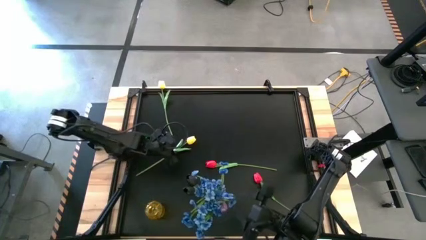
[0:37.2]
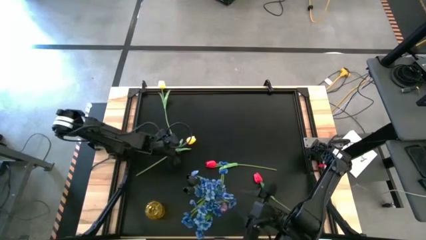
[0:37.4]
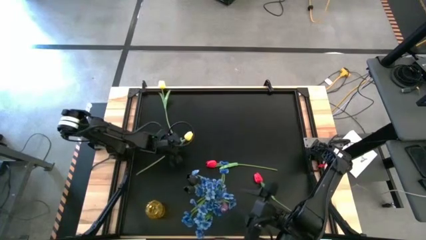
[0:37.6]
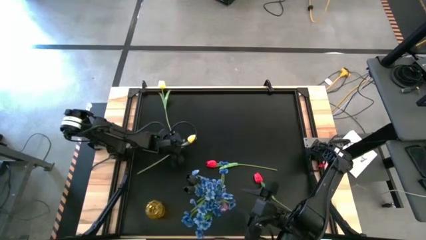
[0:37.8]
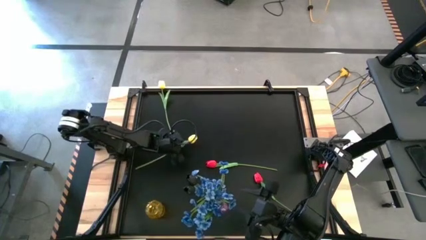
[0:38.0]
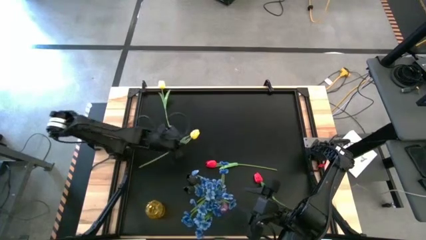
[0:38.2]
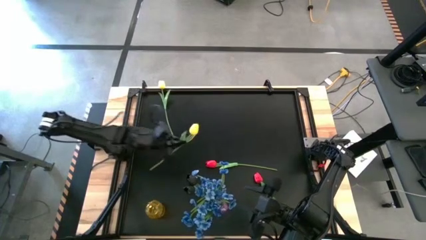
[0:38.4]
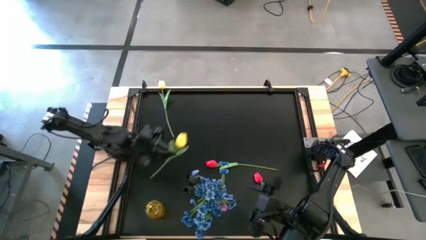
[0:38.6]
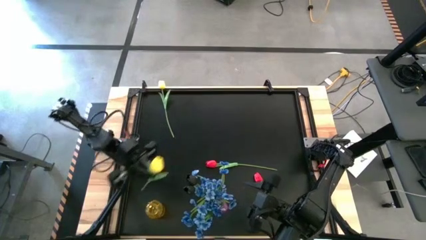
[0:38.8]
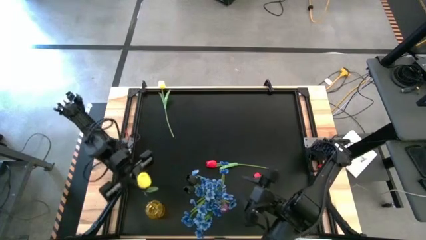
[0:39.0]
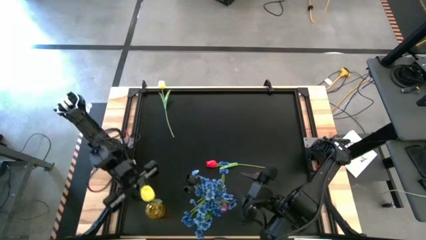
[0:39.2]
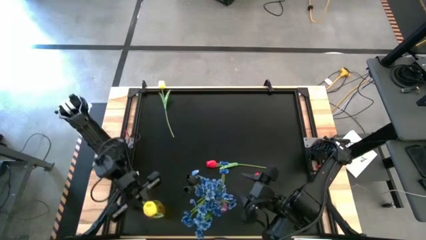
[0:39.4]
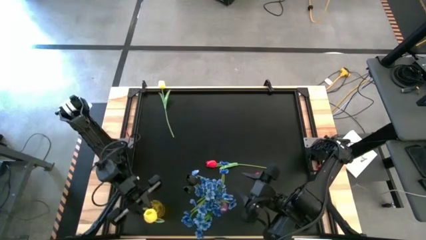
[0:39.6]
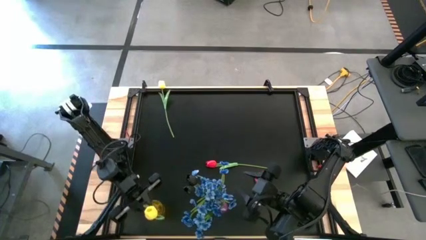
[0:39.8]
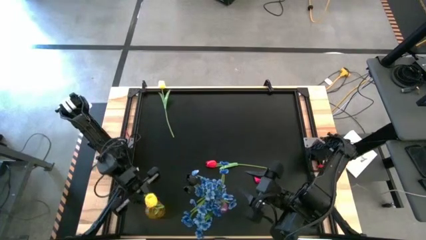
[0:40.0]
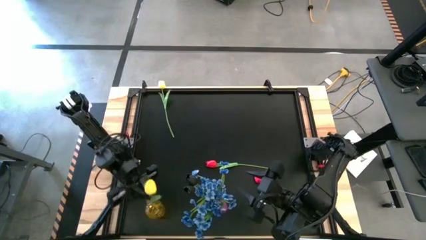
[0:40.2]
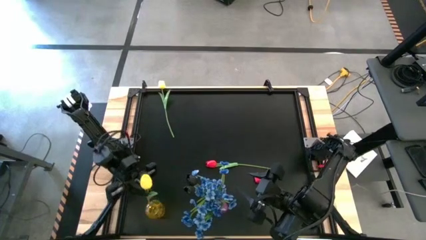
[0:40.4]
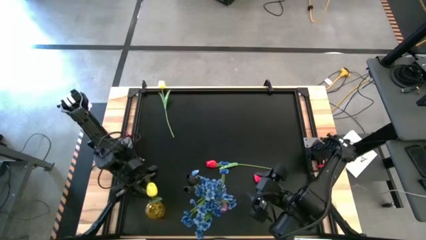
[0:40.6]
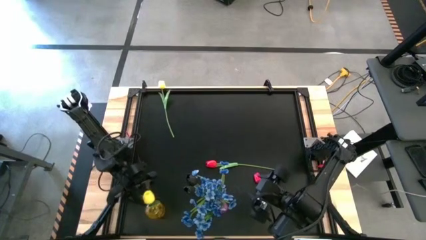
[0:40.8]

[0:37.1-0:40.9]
Task: Sort flowers into vase by color
Put the bottom yellow tulip into the yellow vase

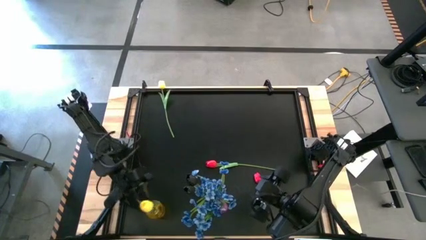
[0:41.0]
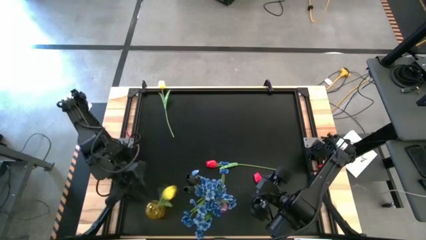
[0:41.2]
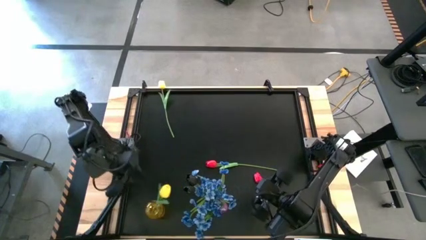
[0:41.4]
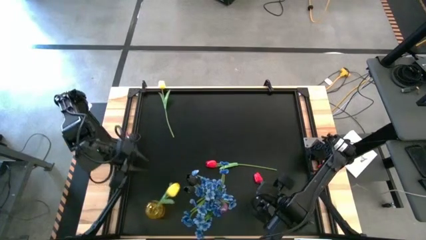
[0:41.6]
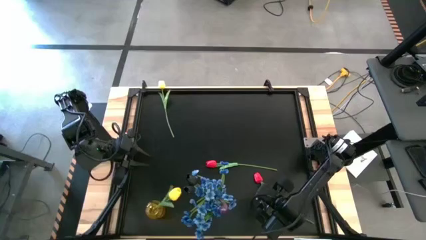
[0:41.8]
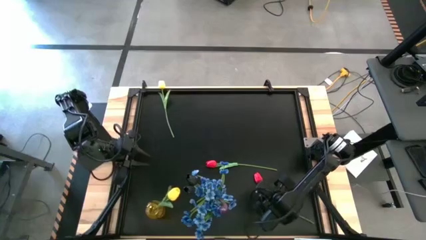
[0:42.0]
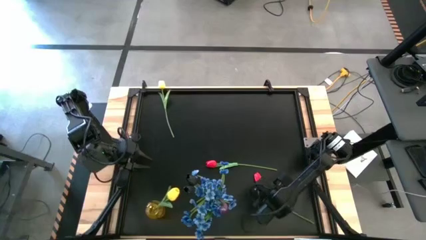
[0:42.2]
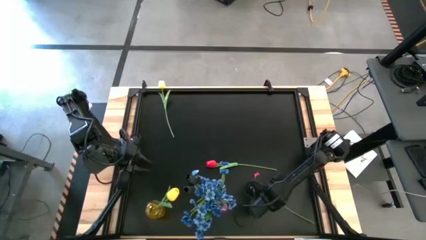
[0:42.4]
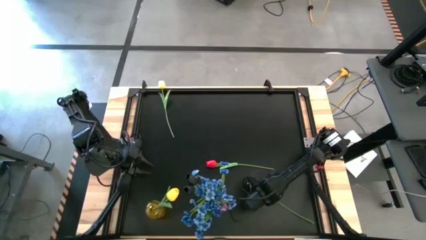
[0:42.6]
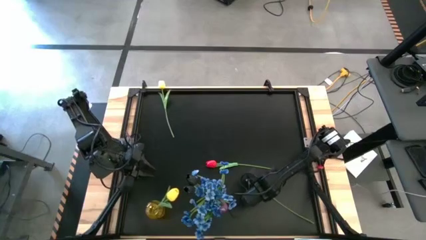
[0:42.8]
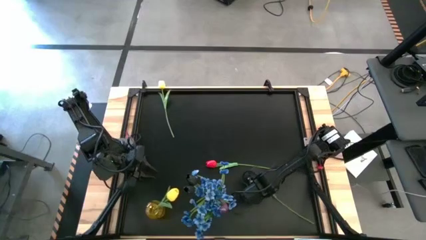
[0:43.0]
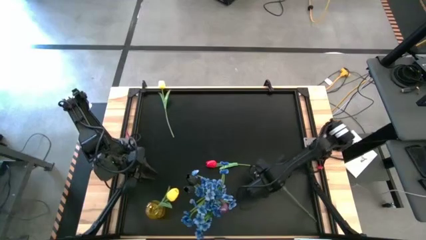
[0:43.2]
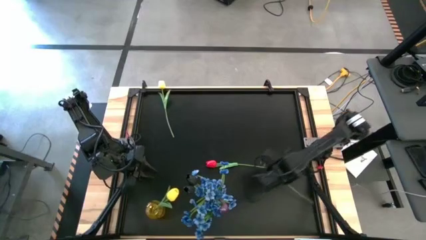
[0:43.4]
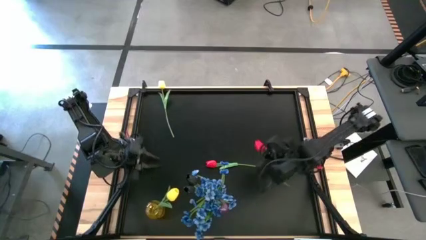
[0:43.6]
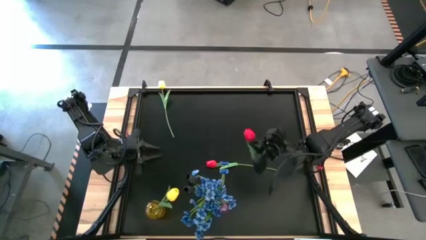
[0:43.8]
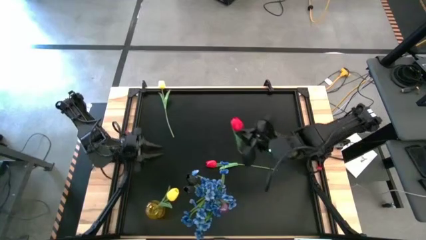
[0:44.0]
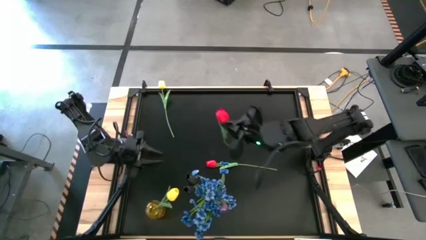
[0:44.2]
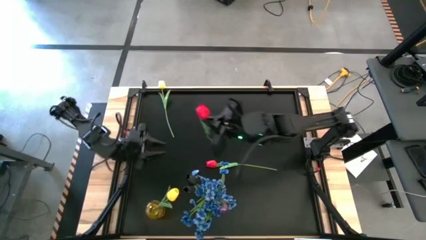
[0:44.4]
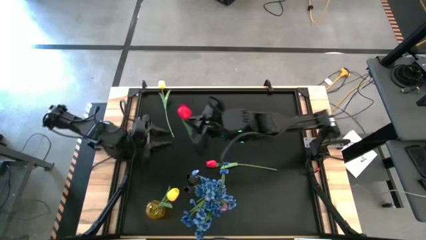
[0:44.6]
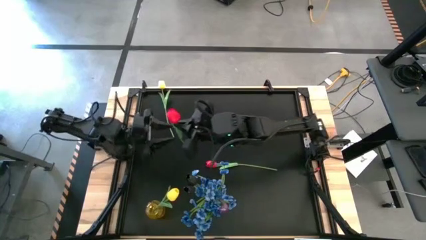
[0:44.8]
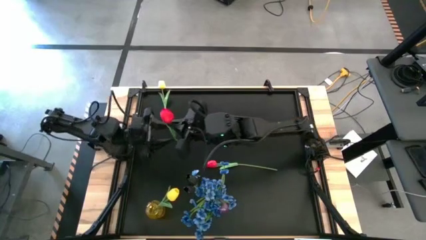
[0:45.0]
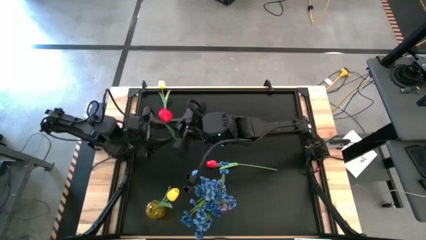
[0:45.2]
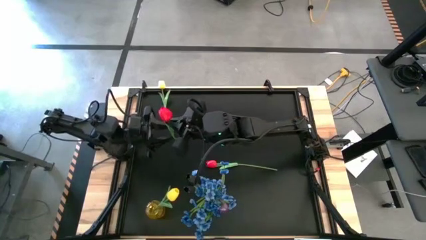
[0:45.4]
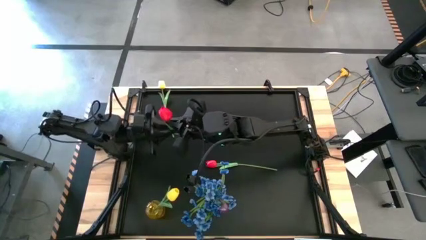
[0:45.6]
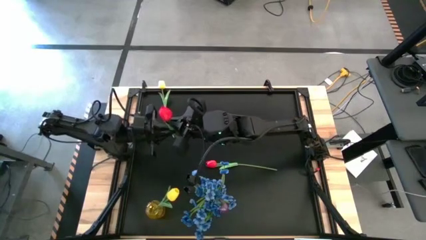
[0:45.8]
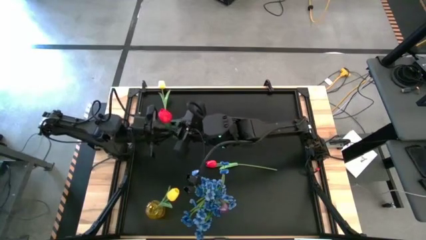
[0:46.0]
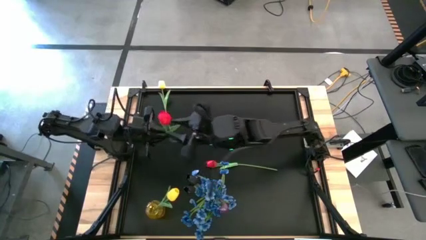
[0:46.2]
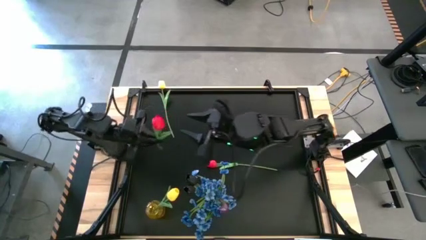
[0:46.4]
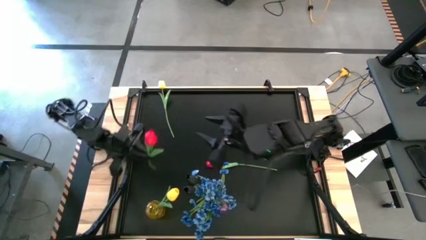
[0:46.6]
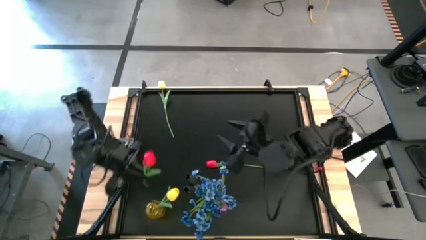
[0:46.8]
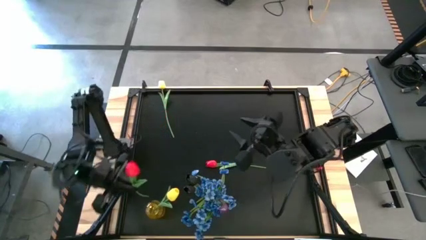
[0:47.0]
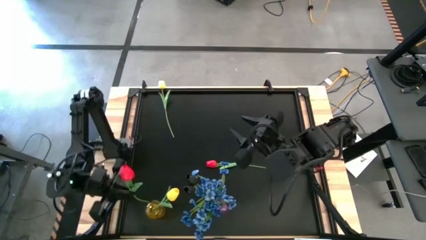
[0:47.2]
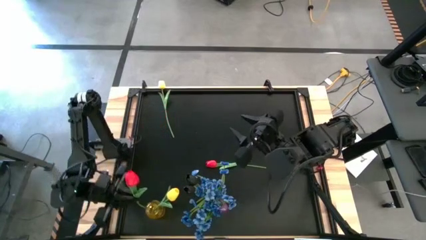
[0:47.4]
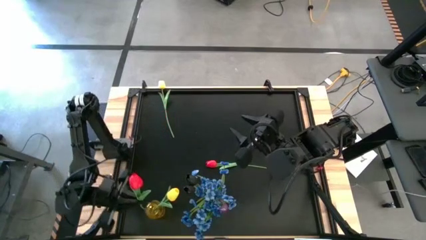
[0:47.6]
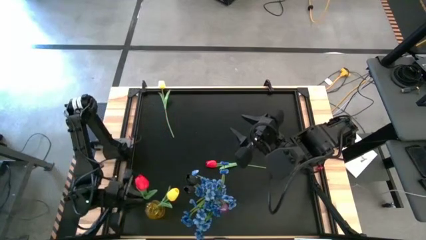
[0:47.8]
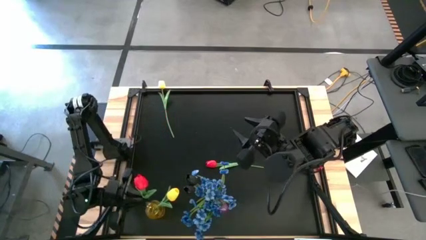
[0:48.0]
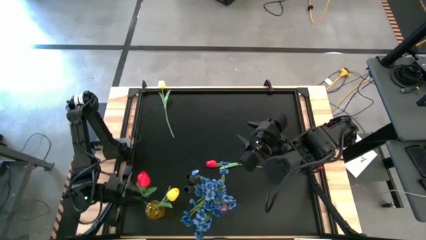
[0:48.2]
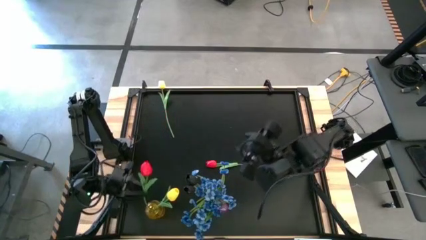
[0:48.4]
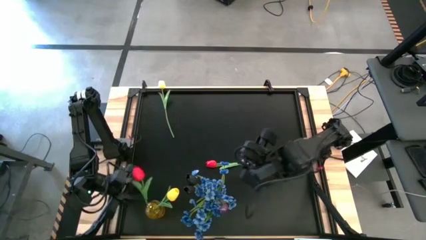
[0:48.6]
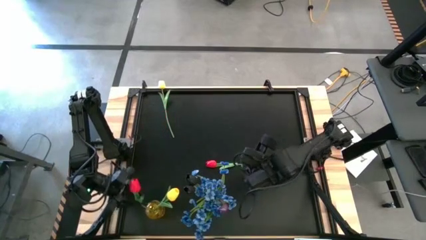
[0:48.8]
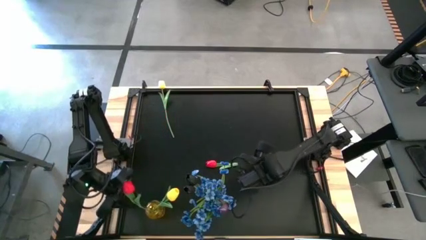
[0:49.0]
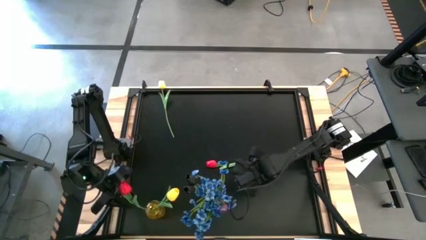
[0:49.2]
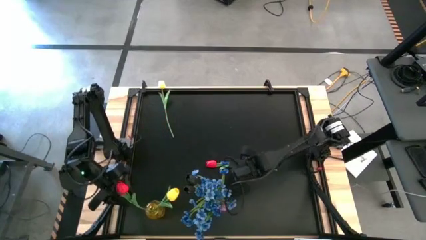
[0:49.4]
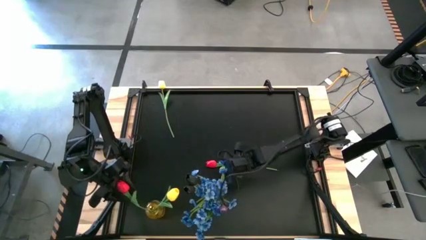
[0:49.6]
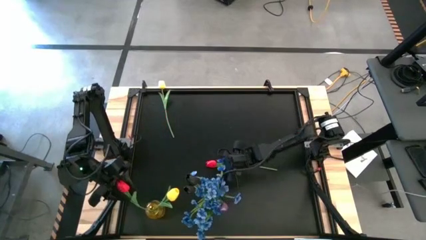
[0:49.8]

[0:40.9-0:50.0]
Put the bottom red tulip into the yellow vase

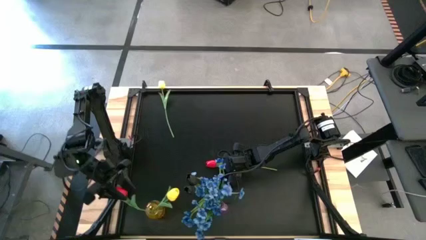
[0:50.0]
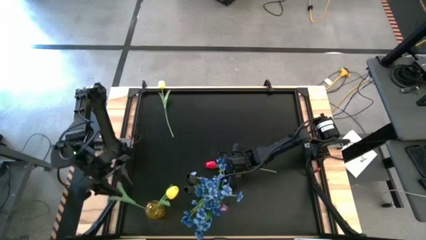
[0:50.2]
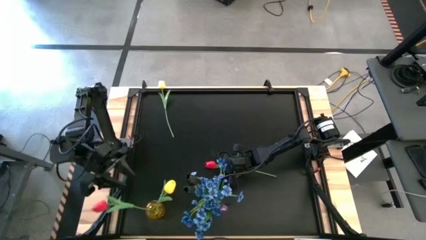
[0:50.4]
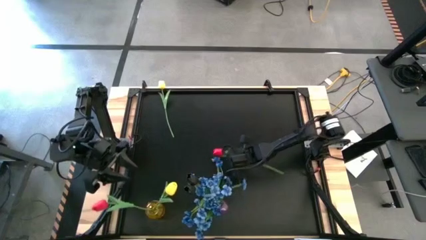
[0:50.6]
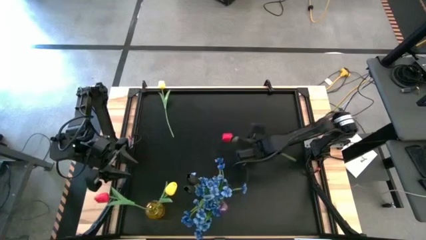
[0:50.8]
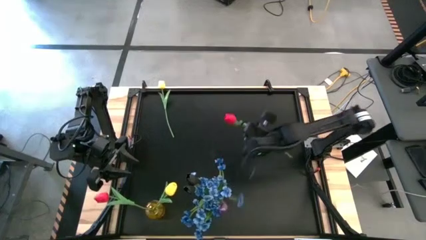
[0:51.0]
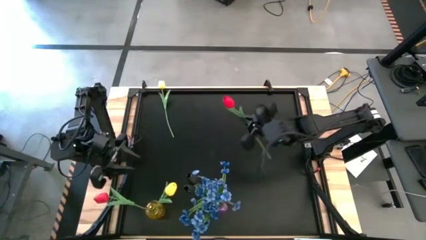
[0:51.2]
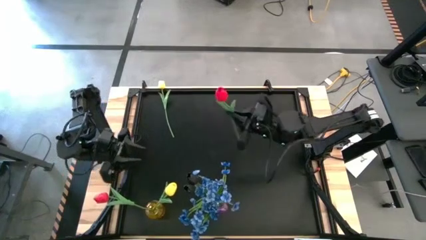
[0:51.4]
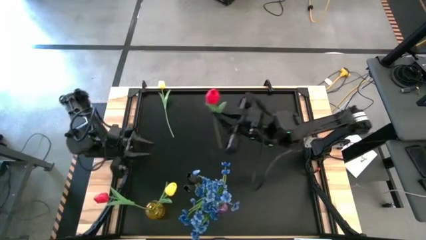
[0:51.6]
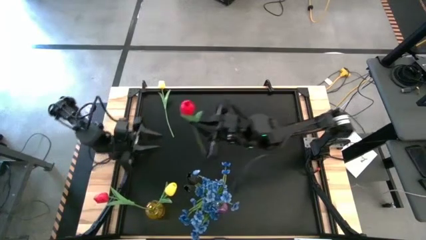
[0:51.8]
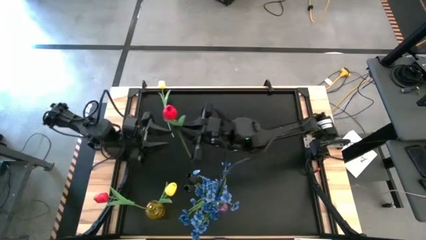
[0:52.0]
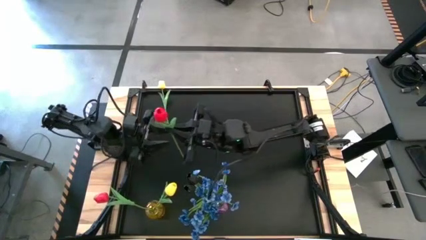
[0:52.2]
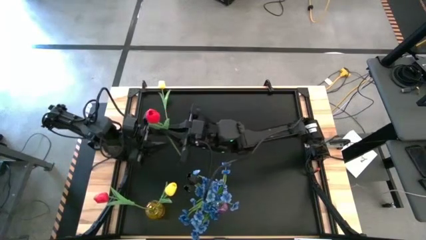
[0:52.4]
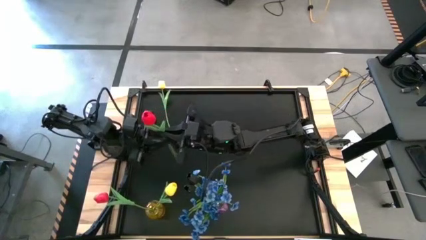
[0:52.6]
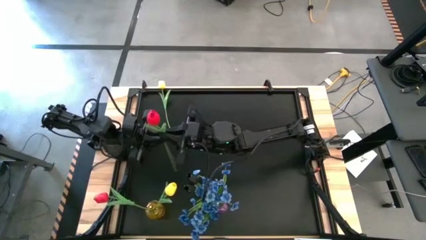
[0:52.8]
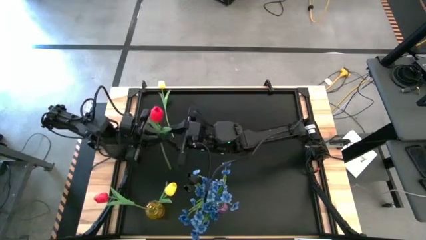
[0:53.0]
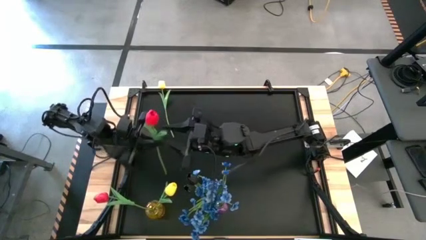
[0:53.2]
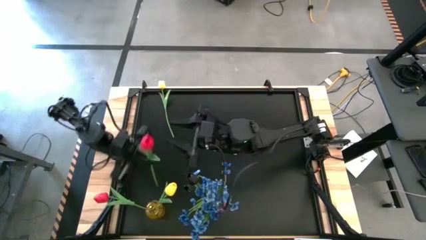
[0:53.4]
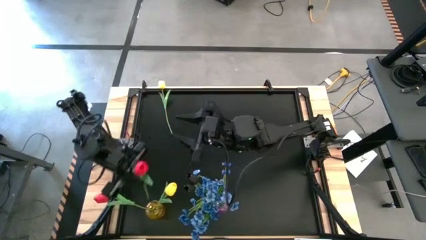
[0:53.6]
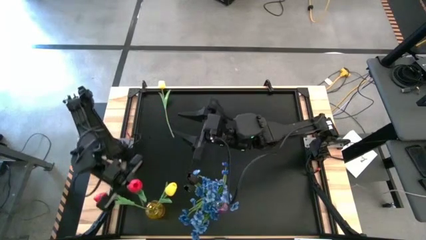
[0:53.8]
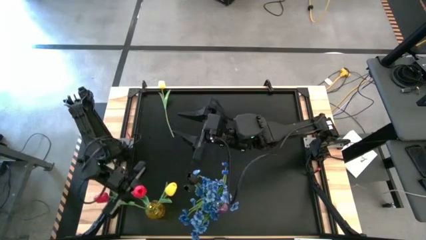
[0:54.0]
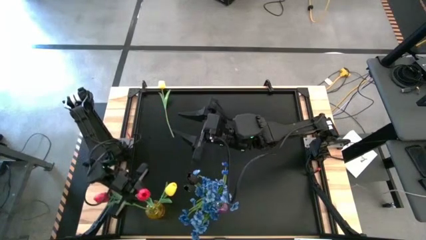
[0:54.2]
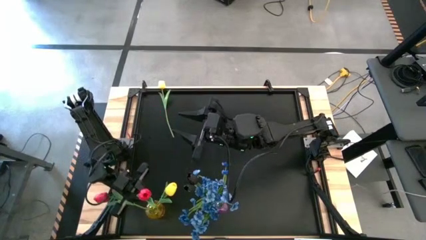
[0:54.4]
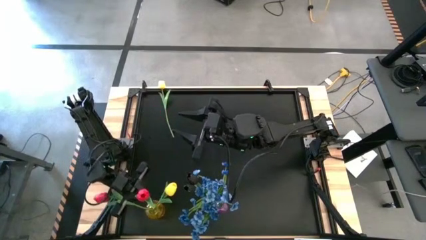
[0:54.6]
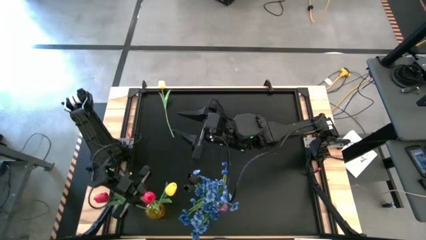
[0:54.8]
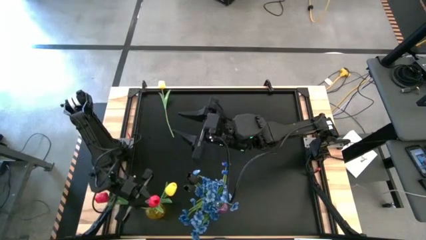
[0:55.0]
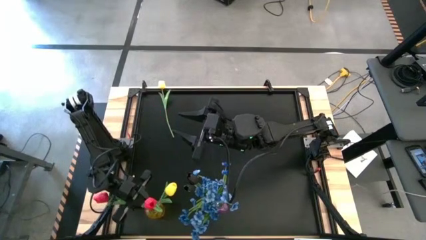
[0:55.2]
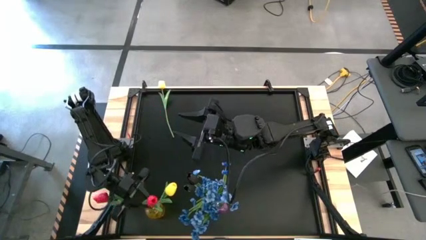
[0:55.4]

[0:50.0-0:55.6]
Put the red tulip into the yellow vase
